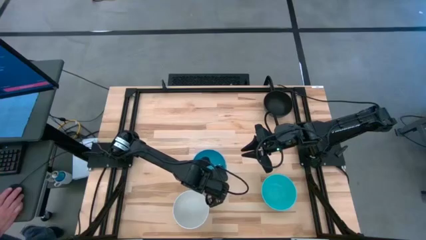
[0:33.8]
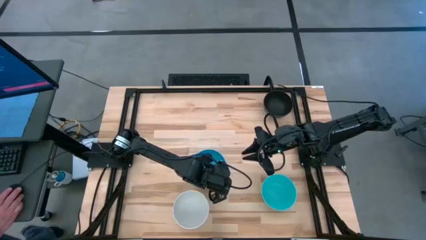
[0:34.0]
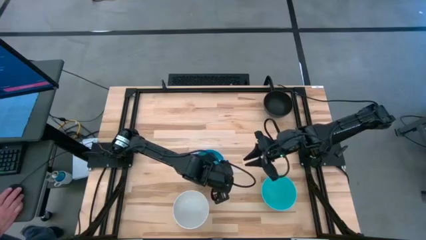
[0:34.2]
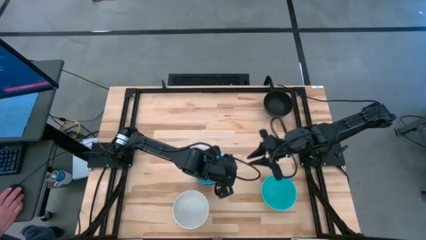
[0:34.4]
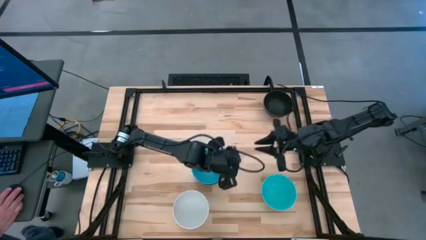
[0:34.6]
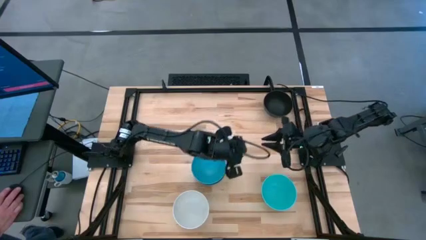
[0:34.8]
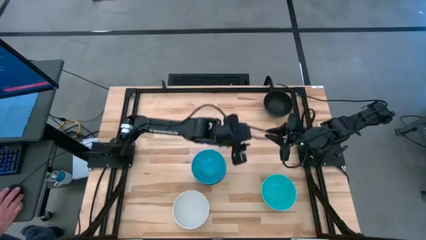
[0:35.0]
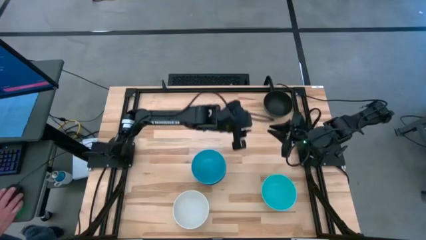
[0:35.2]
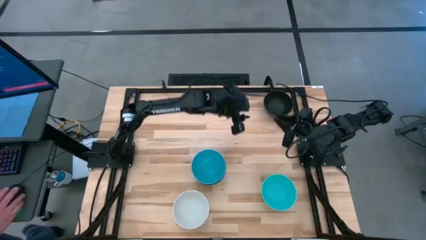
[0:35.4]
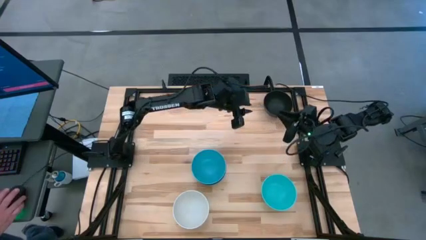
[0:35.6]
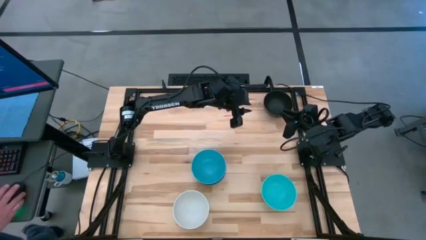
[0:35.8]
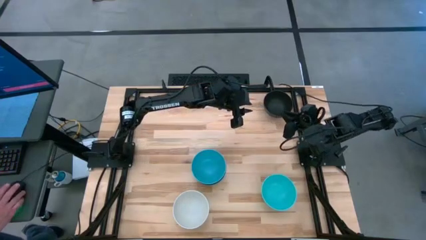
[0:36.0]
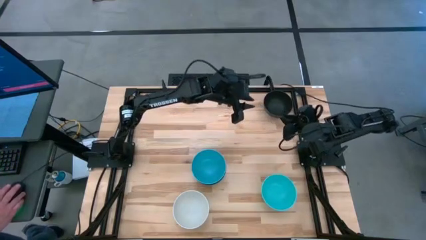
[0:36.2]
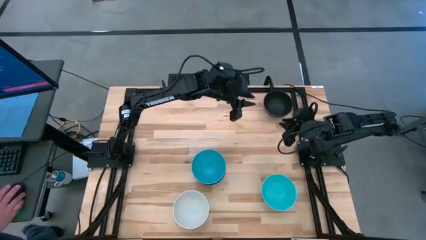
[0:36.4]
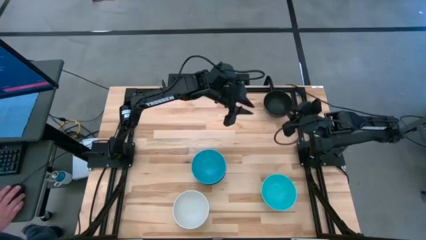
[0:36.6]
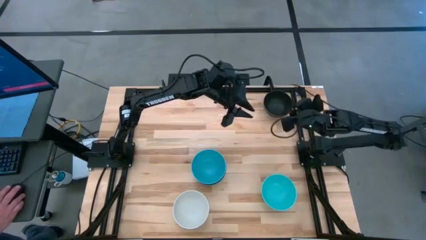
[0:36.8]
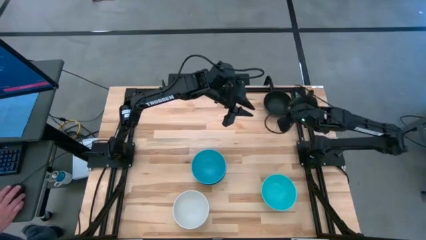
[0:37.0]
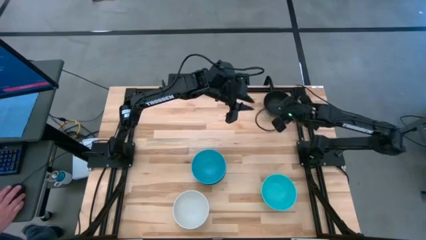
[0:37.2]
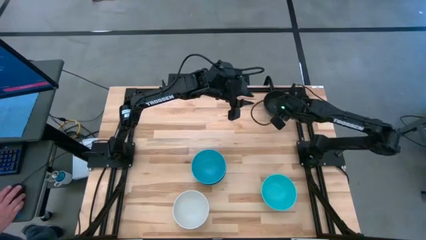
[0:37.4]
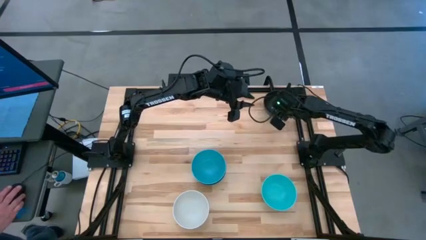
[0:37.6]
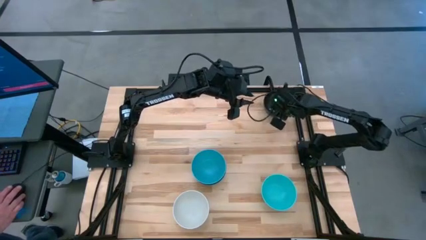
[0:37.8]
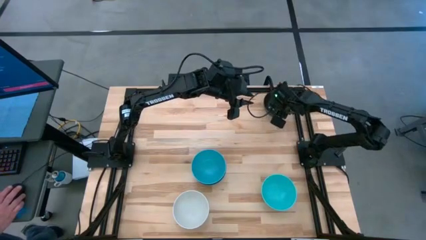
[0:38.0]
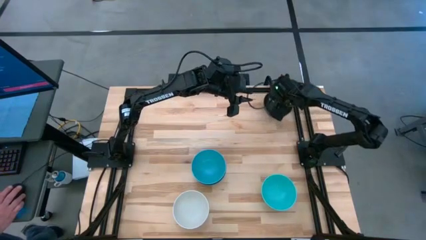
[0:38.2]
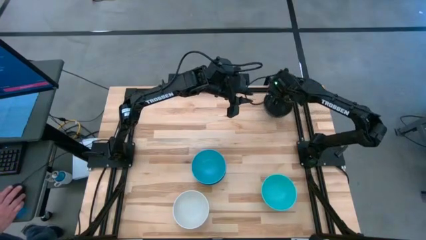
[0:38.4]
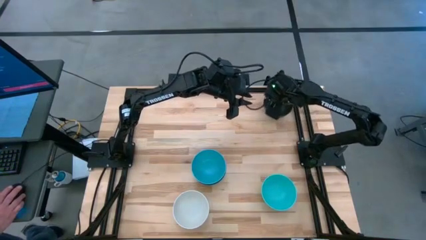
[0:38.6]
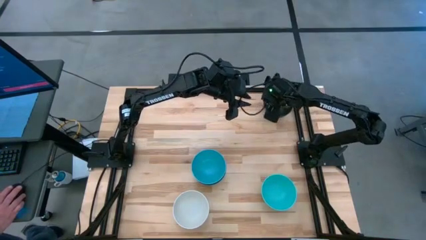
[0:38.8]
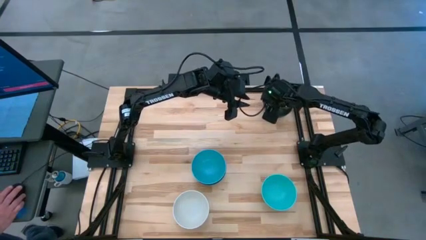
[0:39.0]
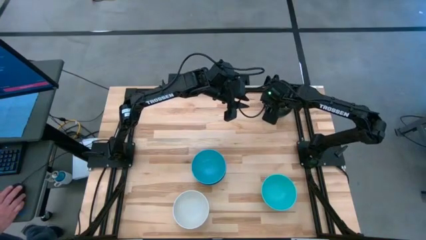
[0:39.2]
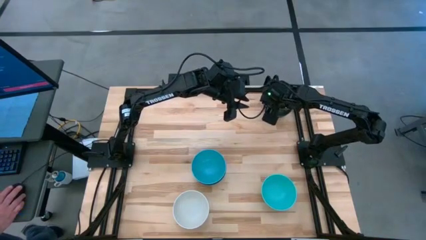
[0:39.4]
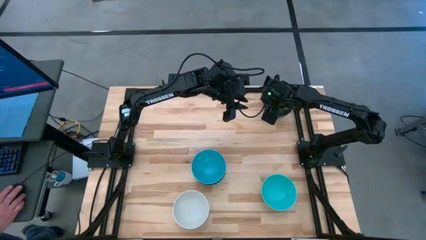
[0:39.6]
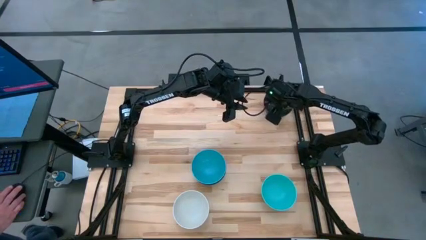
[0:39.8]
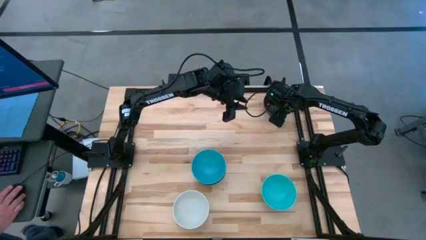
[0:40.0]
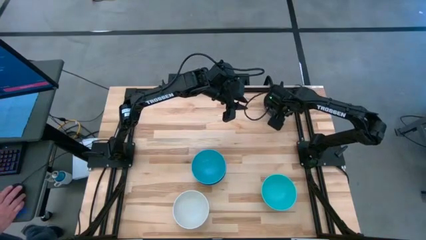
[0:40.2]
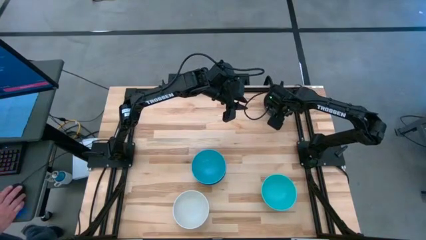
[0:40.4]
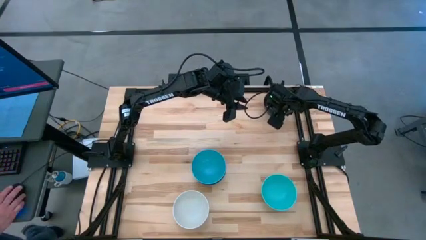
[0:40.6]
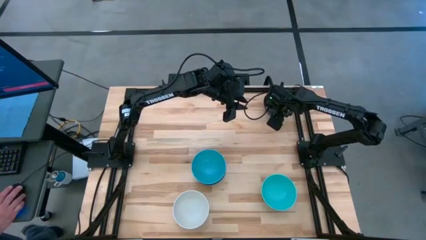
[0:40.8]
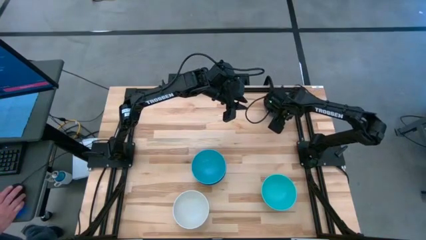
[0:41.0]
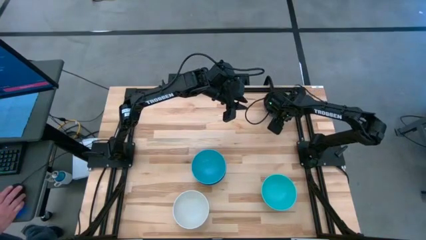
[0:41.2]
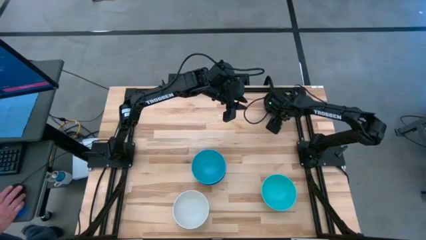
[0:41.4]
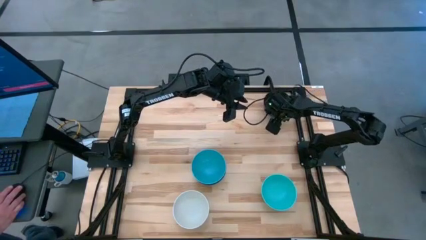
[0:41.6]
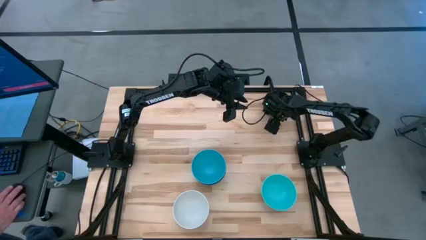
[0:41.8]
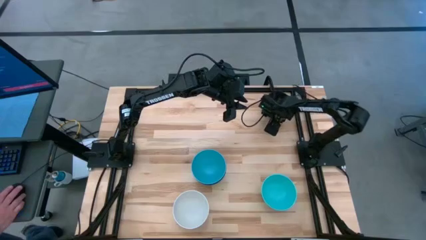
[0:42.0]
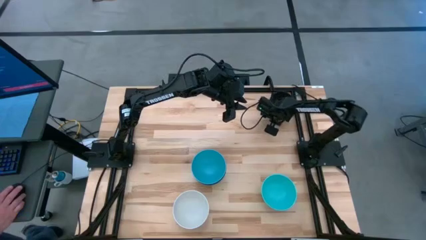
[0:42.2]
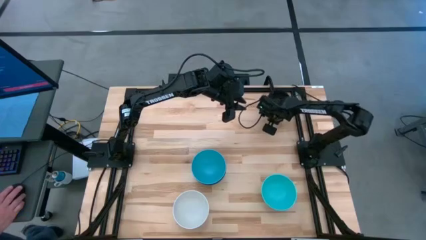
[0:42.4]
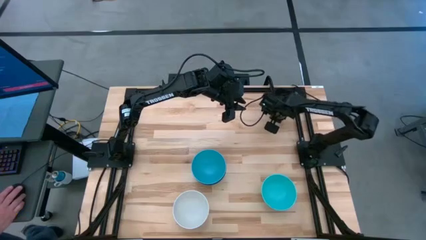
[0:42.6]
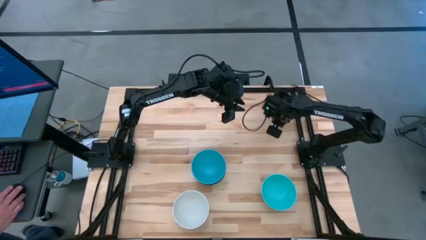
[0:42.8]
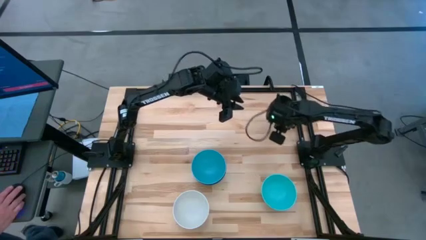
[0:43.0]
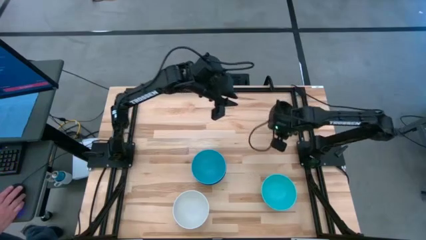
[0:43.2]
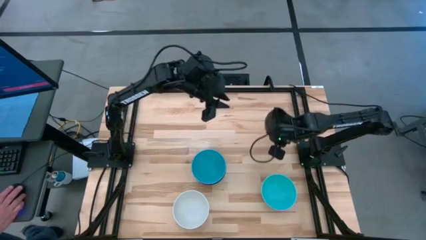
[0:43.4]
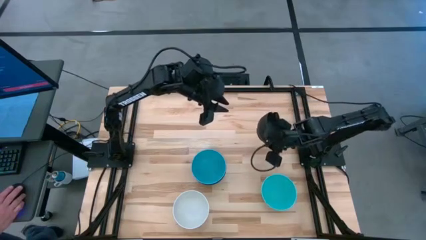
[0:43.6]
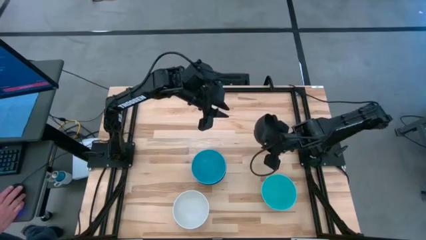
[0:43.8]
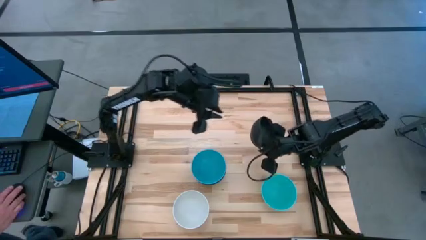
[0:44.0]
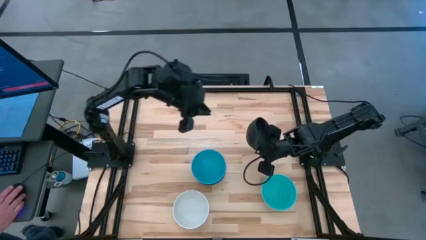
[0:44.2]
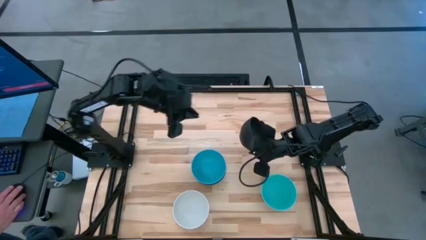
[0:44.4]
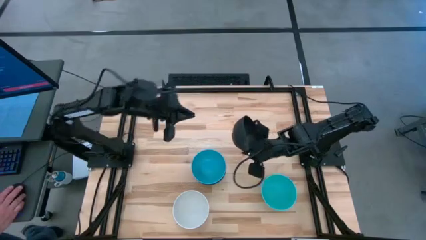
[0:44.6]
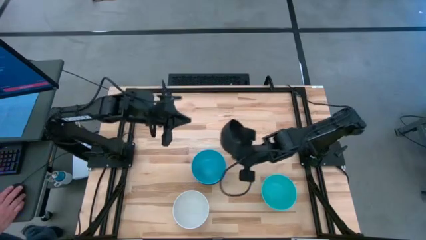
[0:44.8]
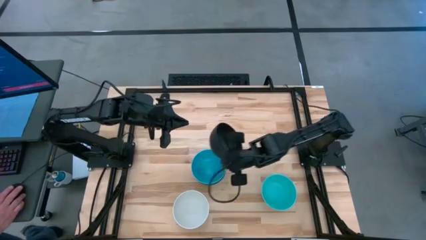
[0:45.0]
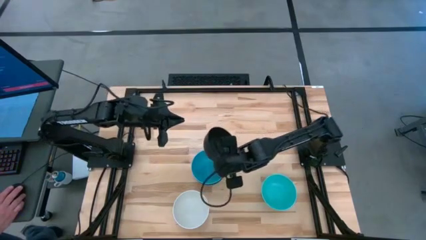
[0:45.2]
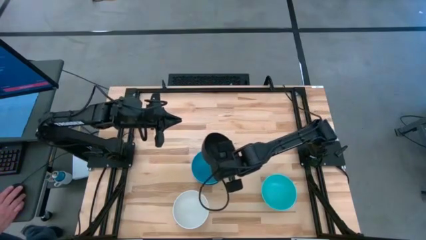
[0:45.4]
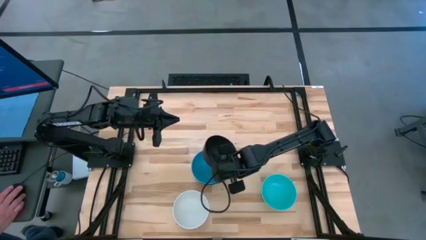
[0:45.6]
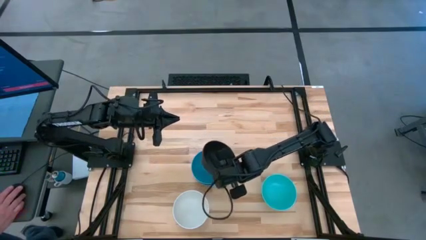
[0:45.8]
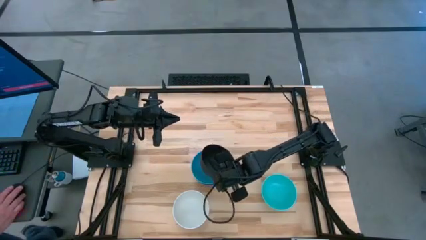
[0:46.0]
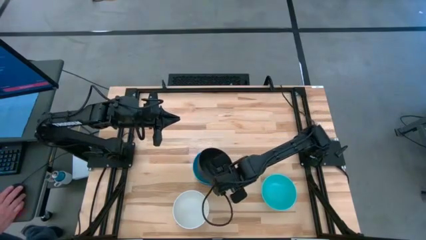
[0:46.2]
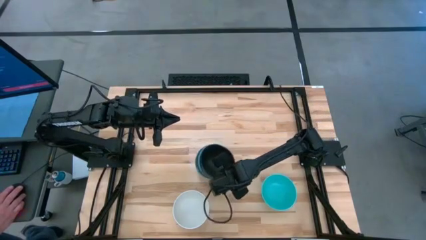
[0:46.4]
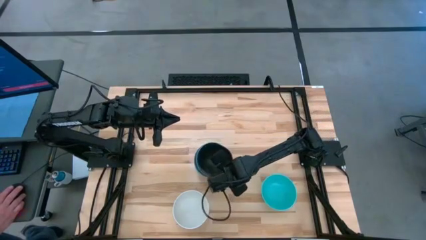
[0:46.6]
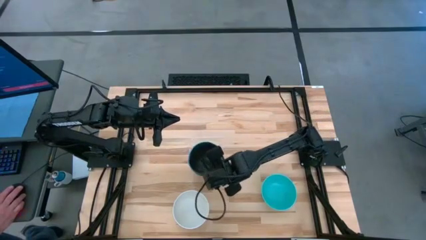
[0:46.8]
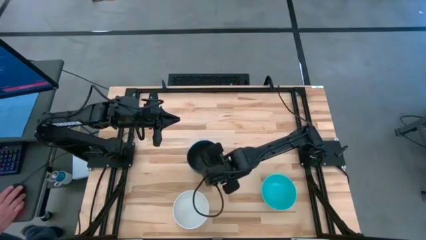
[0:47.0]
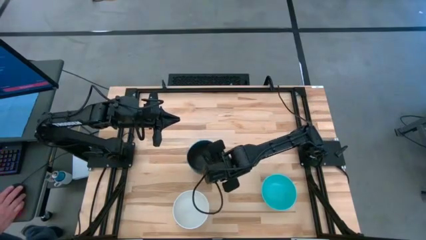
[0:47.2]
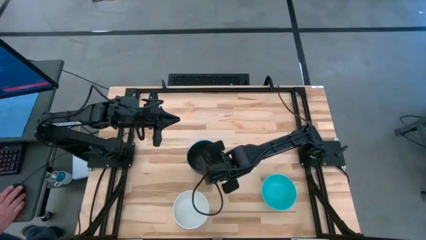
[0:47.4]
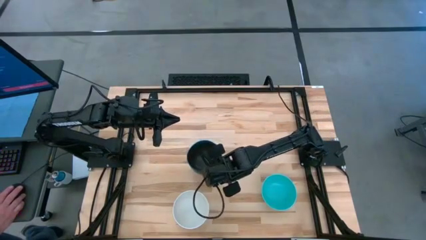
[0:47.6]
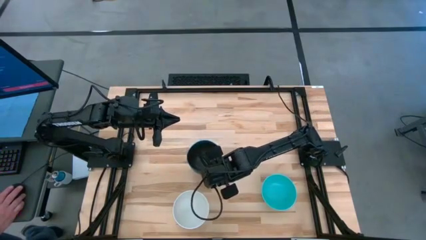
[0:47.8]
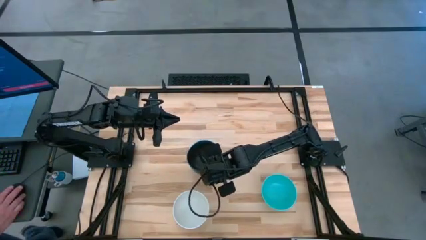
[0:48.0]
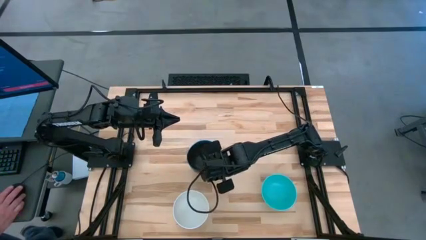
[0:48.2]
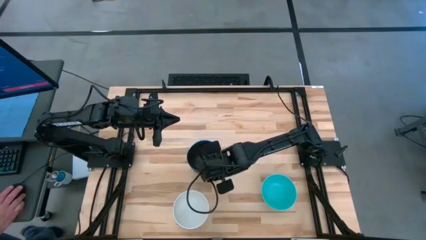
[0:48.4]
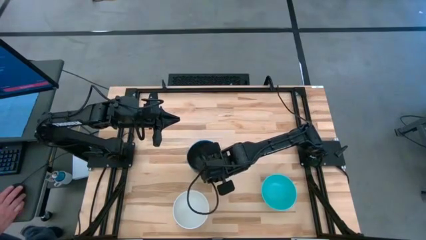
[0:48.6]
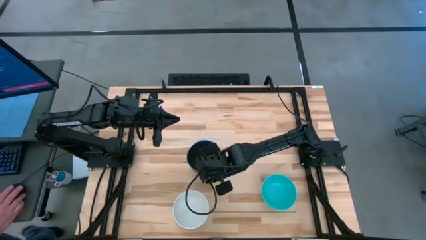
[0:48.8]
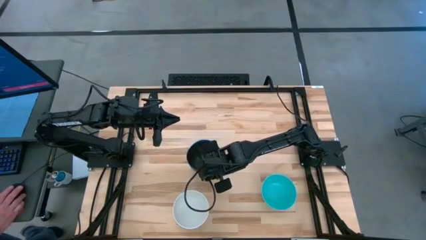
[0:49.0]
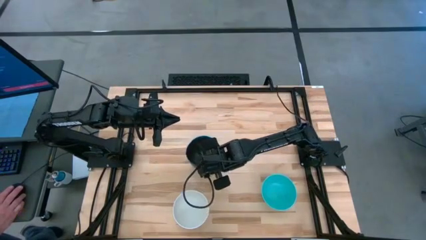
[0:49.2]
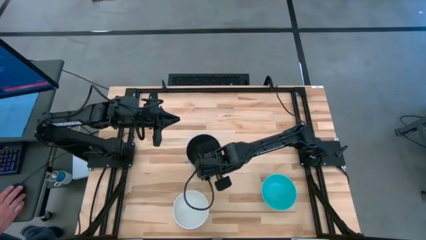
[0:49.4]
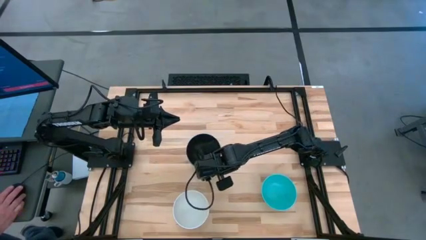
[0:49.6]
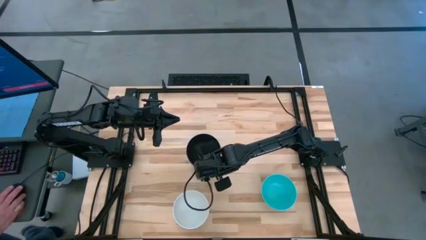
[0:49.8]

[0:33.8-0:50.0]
Task: Nest bowls inside each other
Stack the black bowl on the light blue bowl

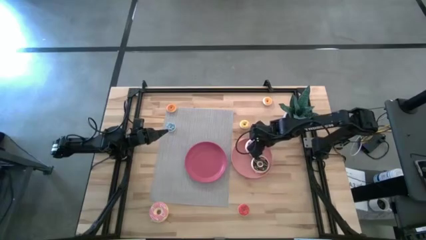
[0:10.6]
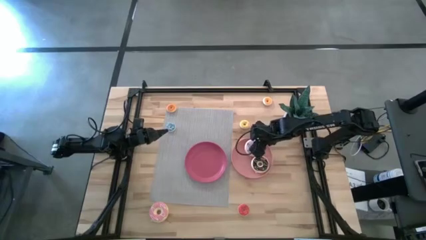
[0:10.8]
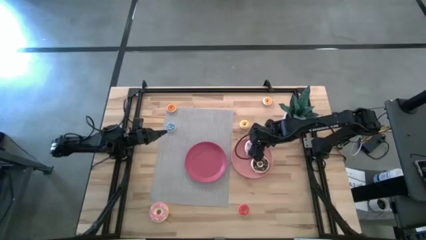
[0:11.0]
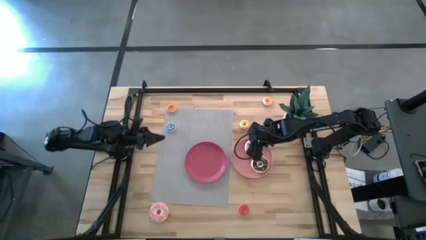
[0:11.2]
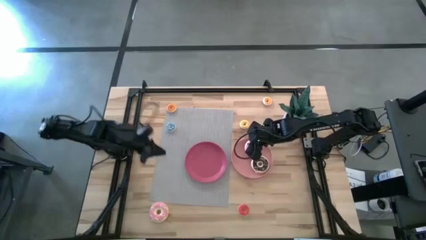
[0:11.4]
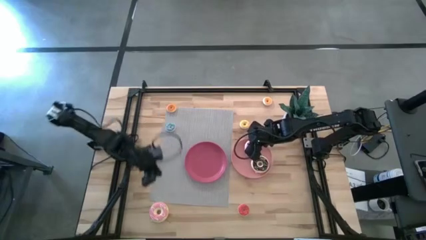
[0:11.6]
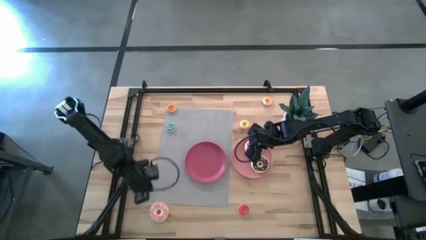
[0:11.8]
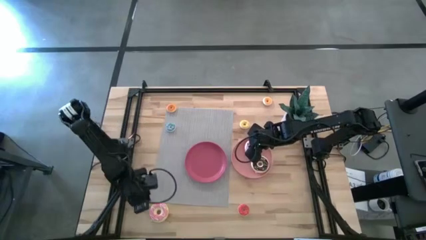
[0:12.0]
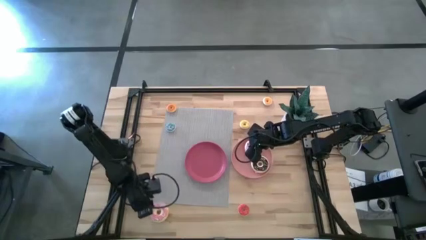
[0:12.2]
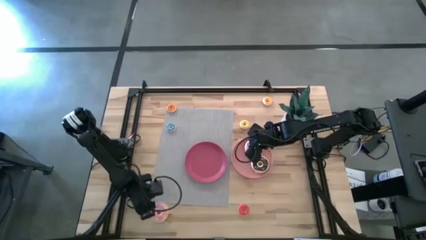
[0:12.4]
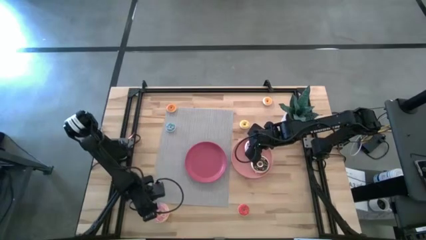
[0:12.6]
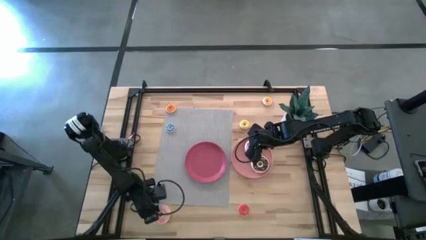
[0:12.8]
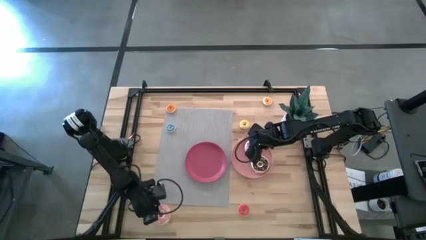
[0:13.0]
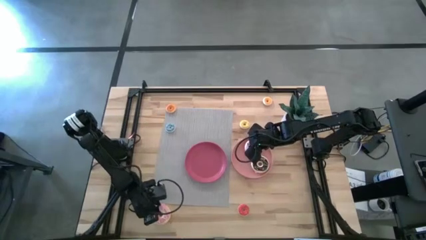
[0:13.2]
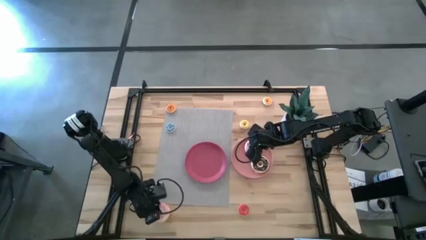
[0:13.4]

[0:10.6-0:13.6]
Task: Pick & Place donuts
Put the large pink donut on the pink plate
